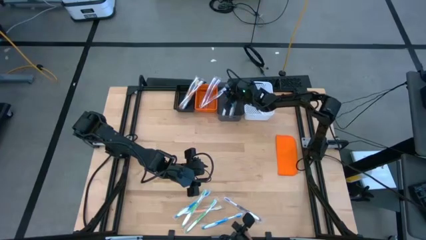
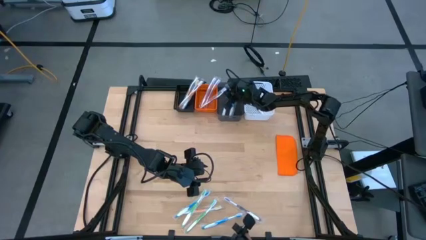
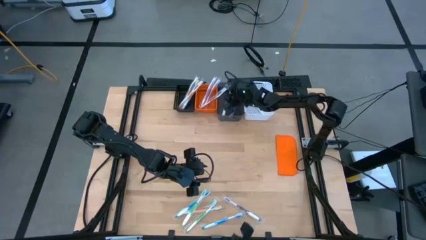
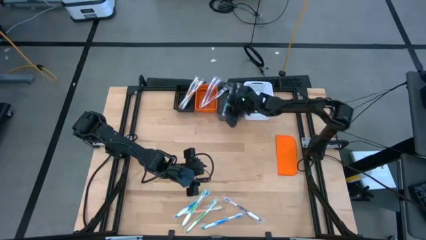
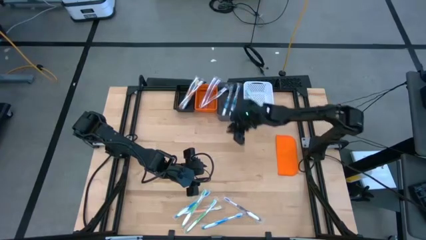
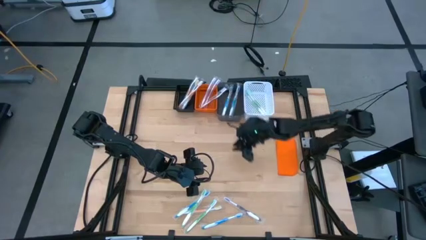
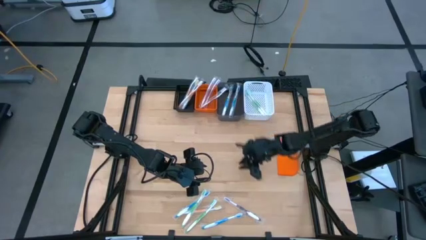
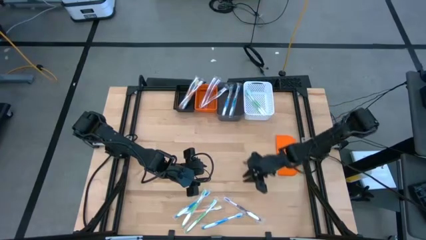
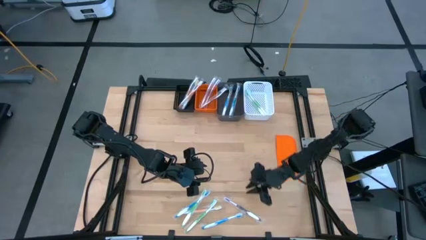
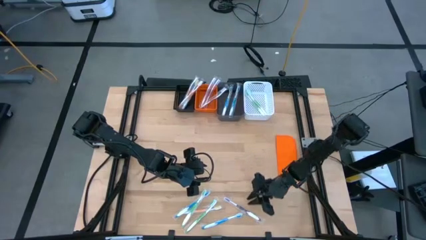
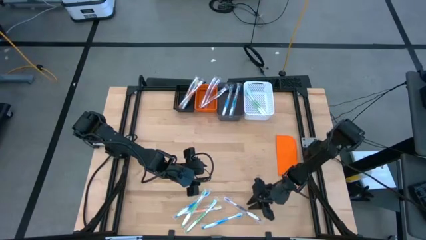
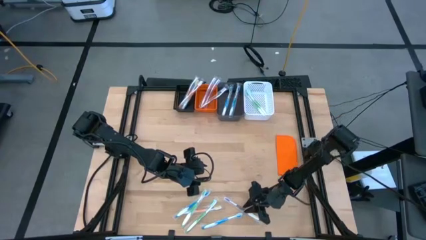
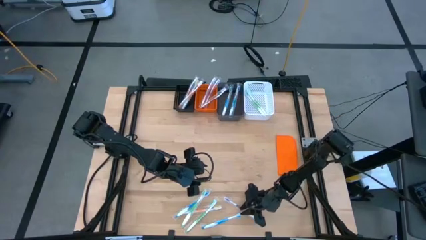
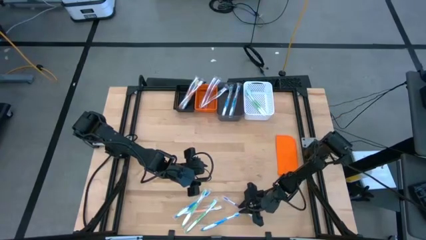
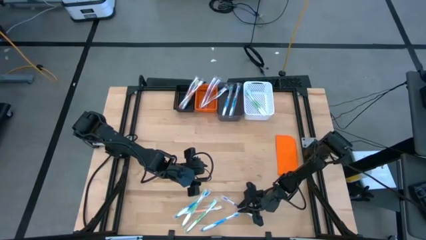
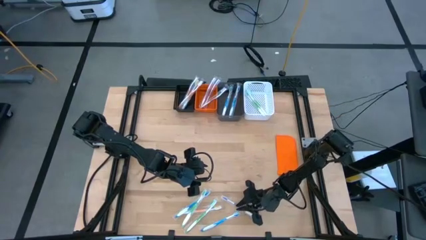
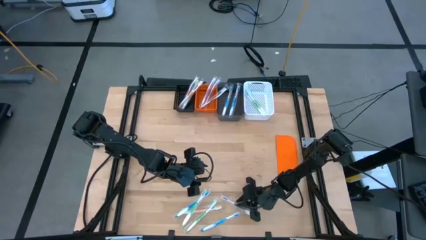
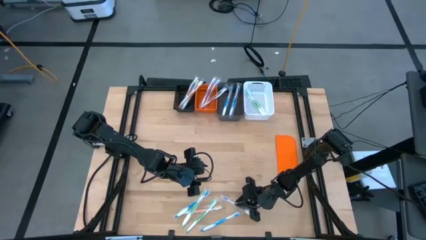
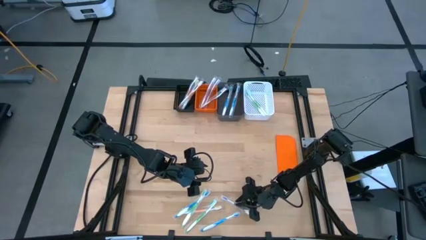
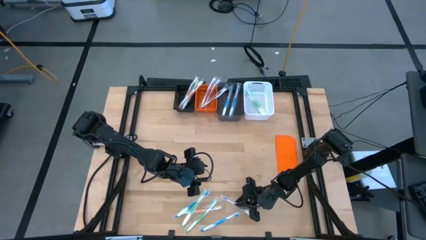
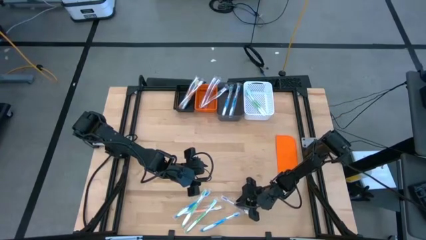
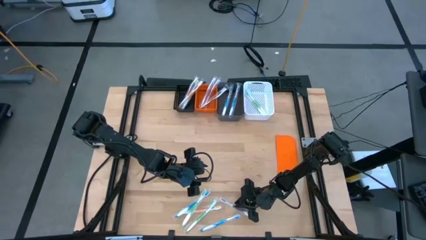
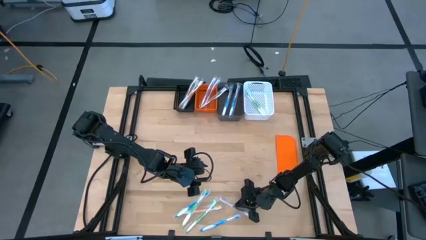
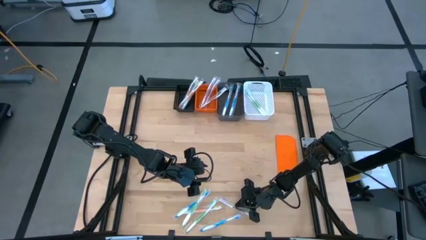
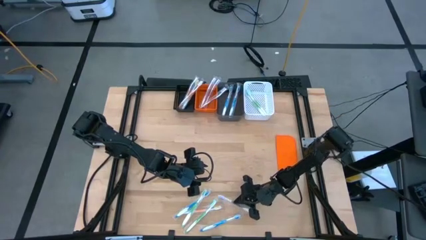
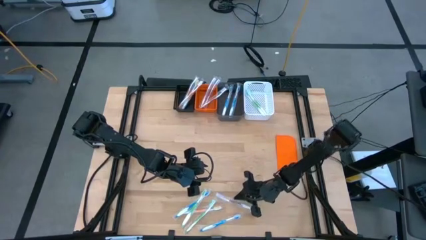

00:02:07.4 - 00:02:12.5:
Task: Pick & Place Toothbrushes
Put the purple toothbrush into the orange bin

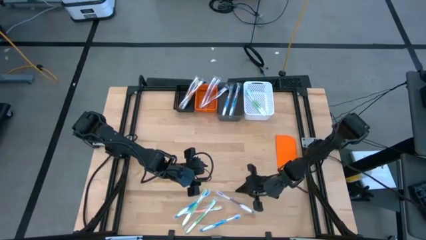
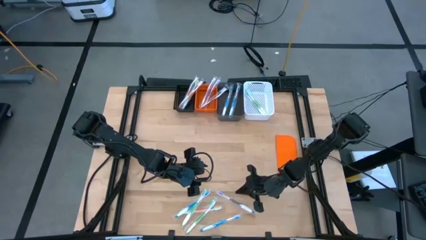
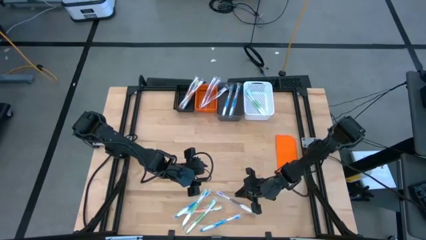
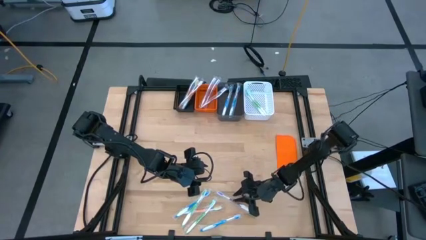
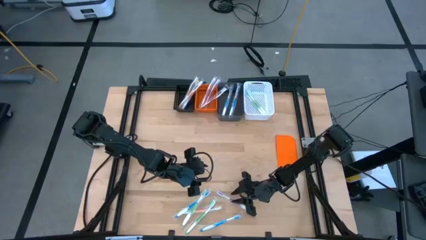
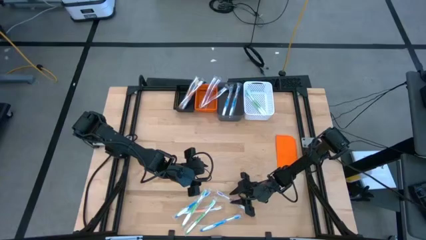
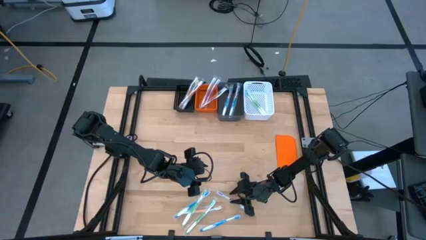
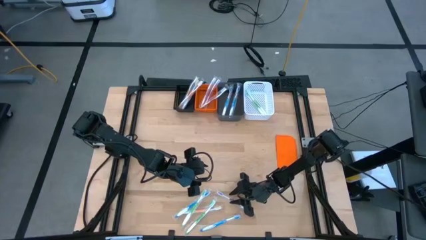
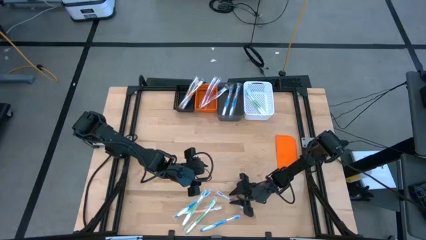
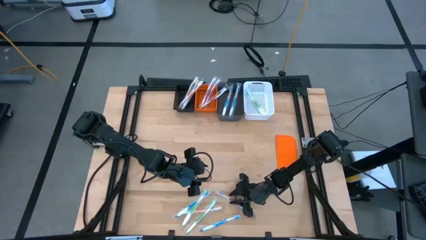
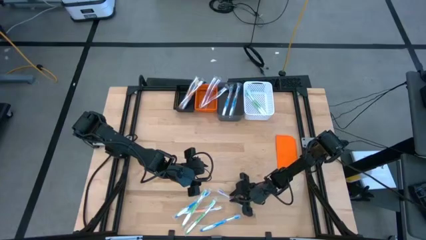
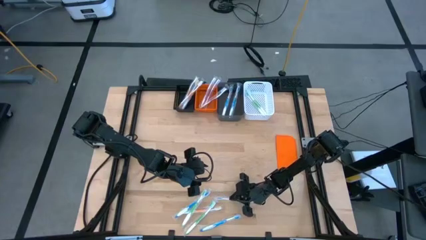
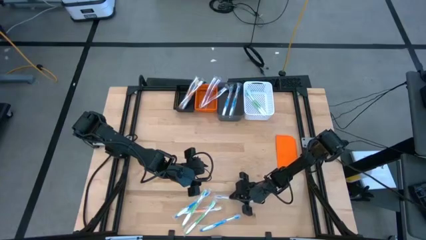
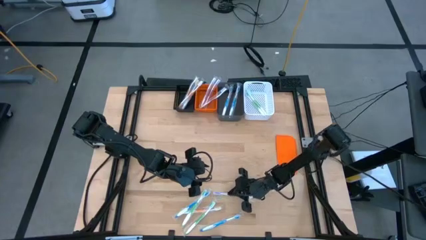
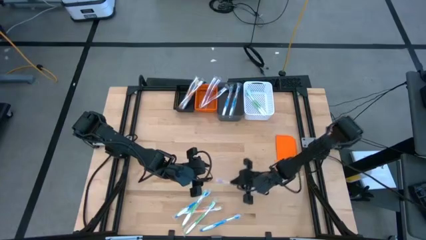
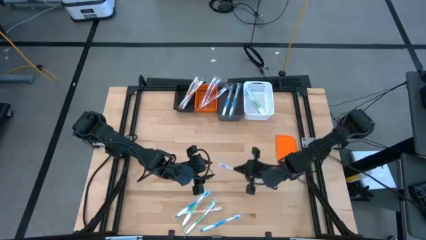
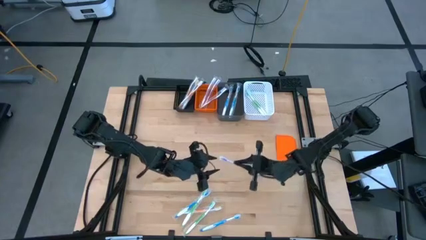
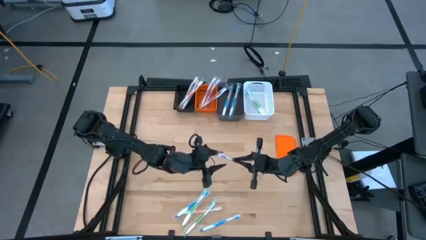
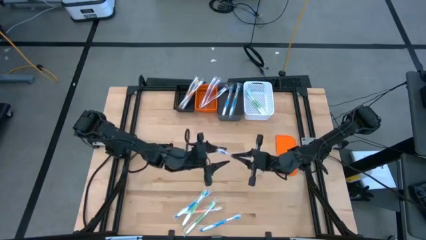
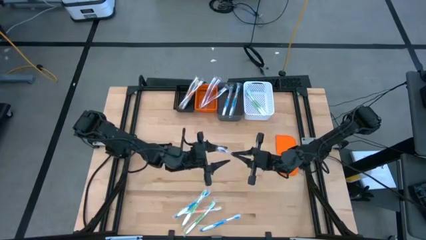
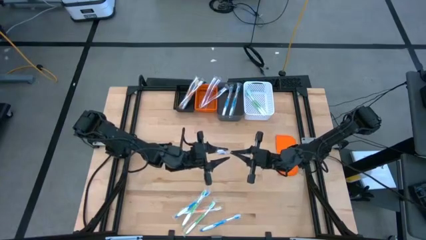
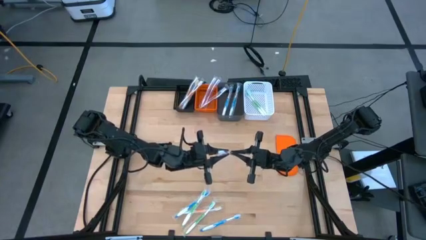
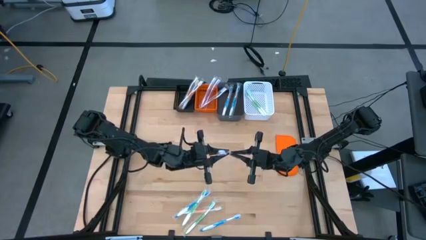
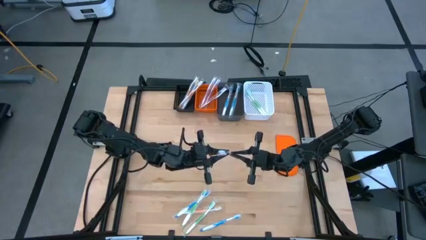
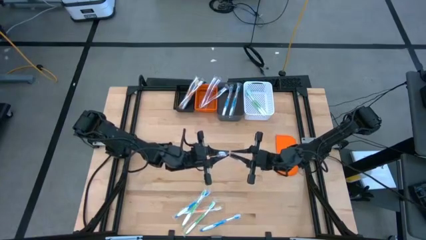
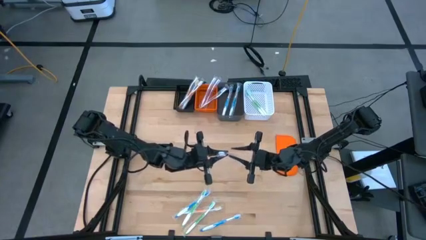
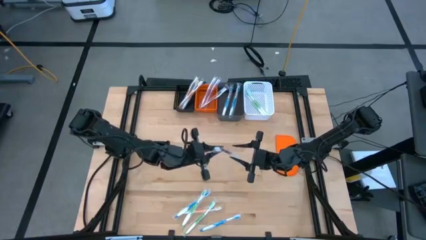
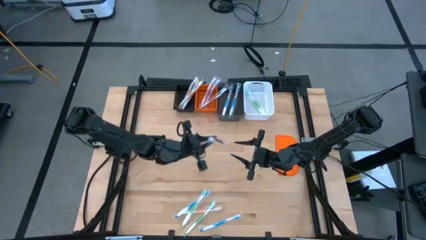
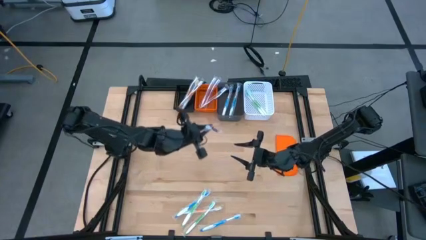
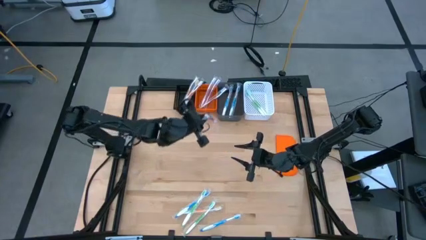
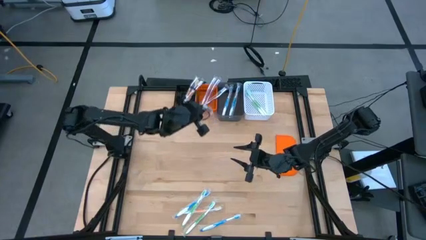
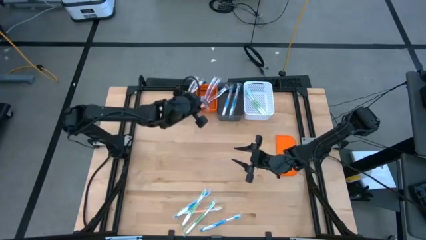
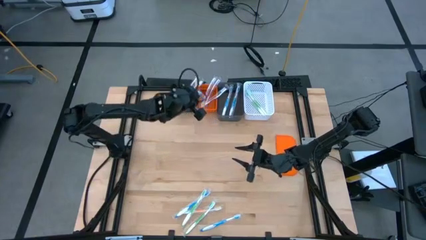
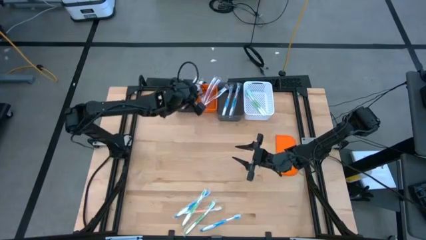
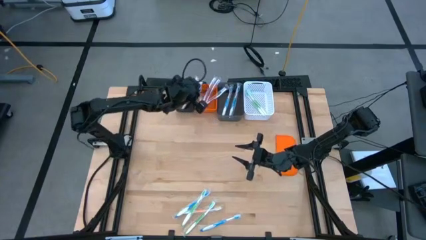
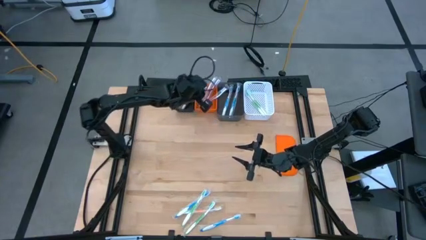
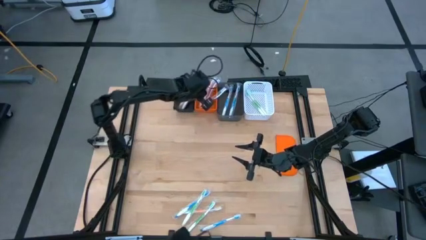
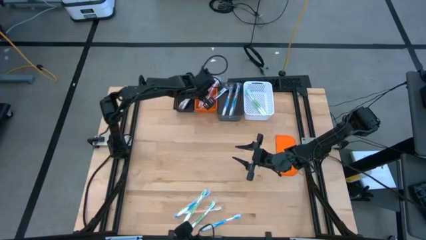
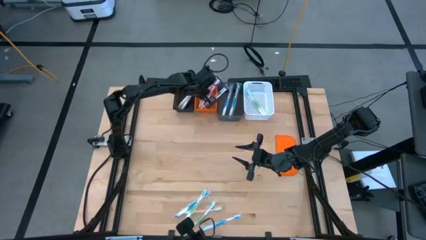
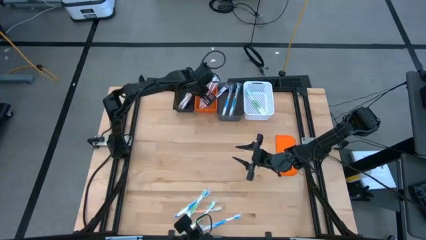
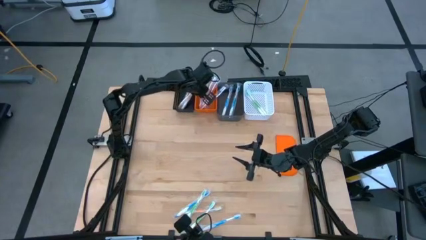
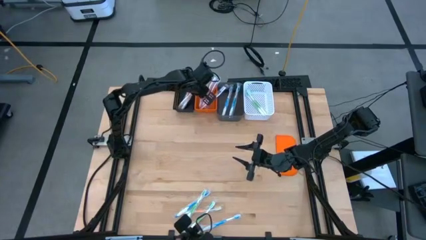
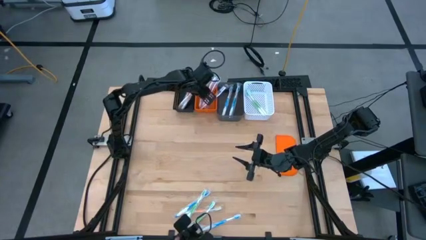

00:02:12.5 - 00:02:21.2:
Put the purple toothbrush into the orange bin

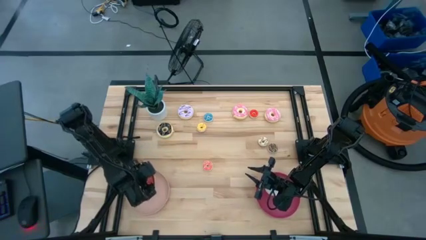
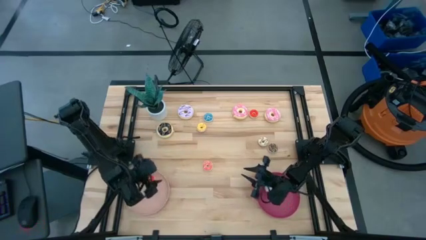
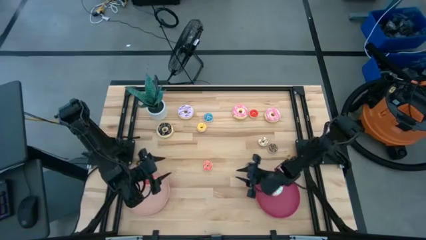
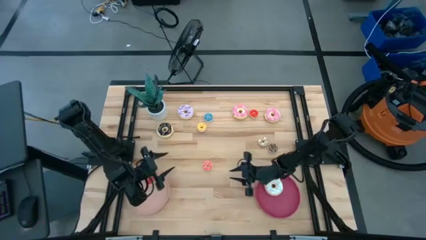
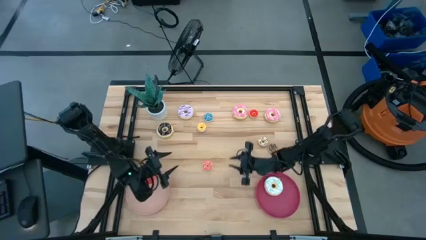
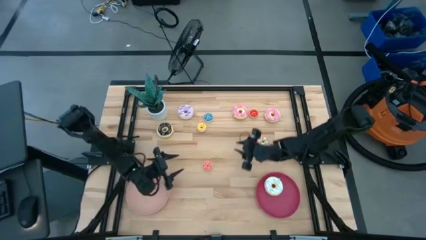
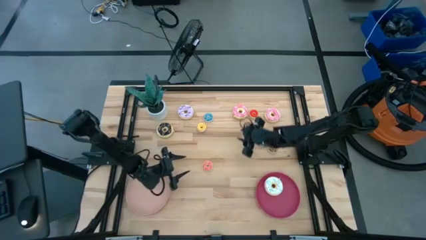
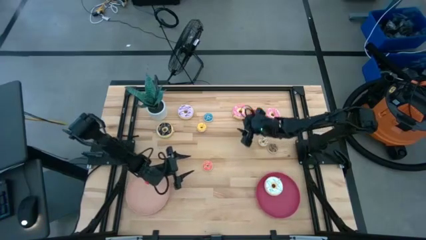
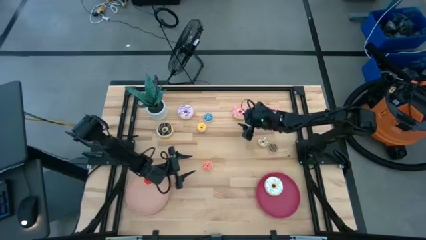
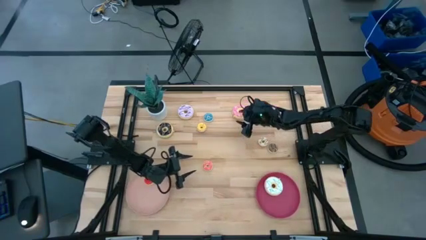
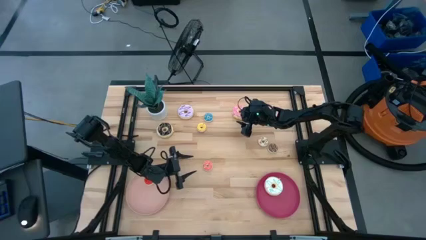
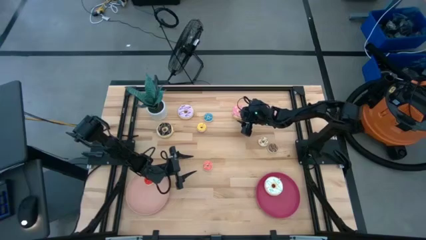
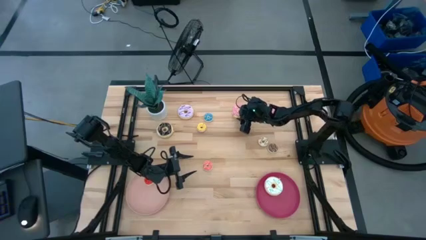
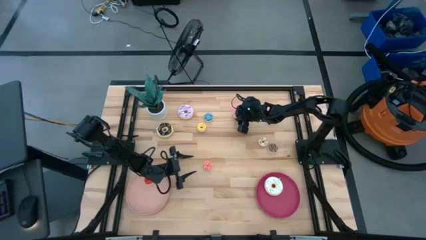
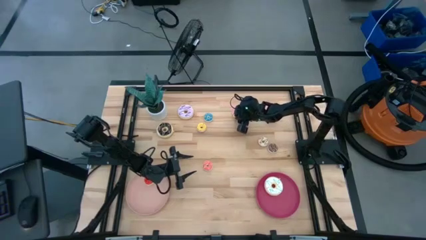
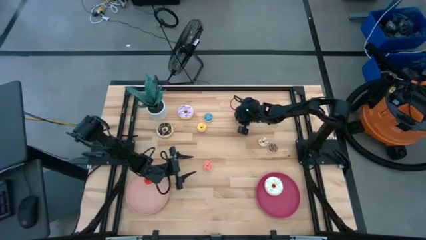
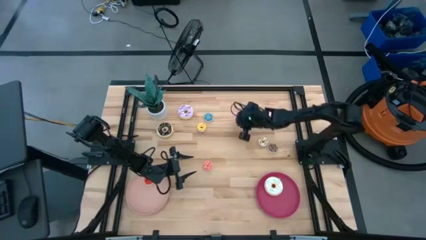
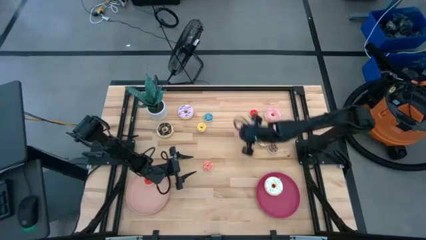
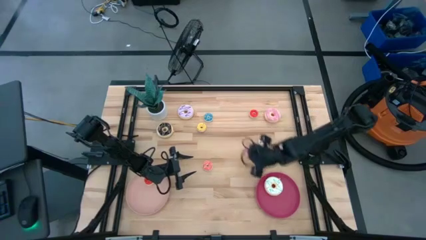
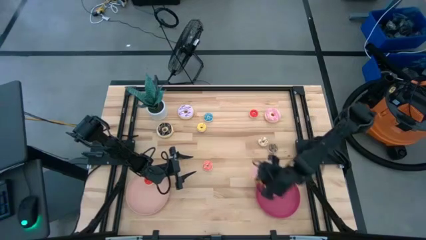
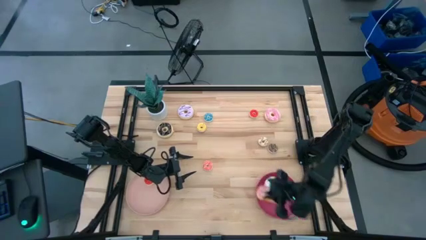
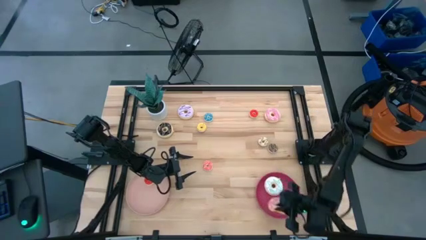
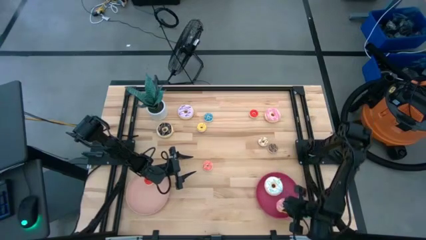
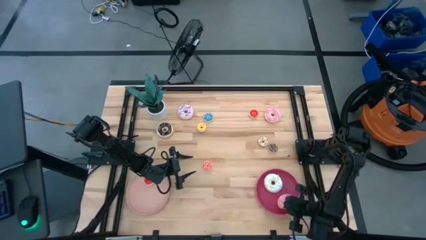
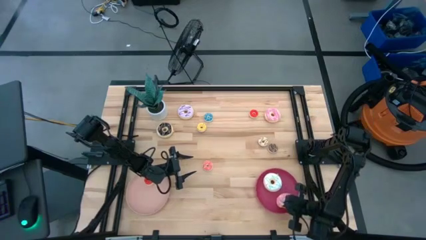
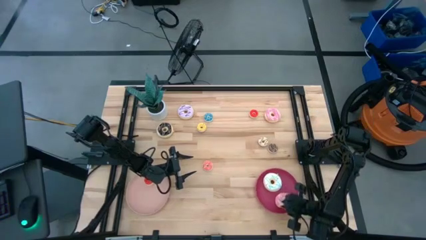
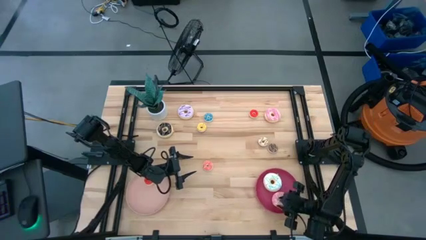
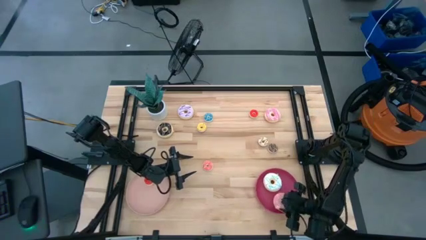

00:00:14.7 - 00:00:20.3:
Task: Pick & Place donuts
Put the left big pink donut on the dark pink plate
